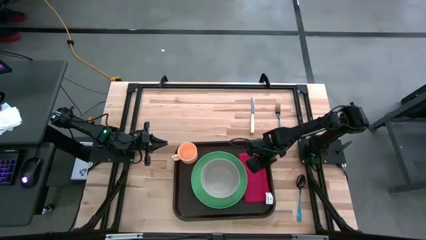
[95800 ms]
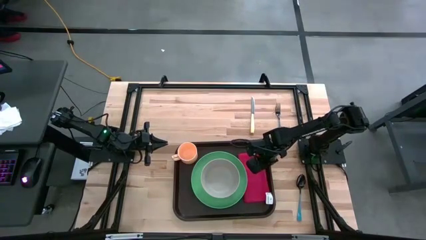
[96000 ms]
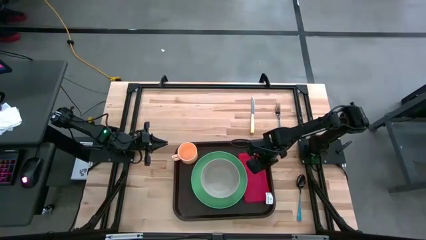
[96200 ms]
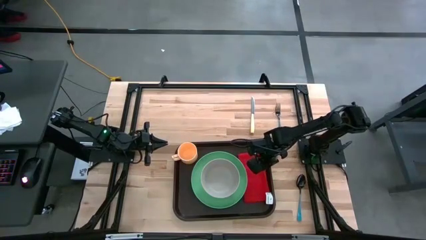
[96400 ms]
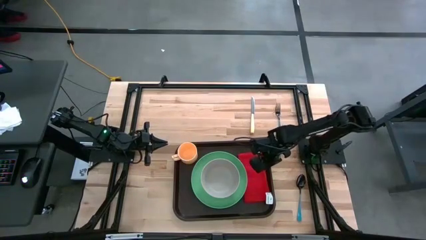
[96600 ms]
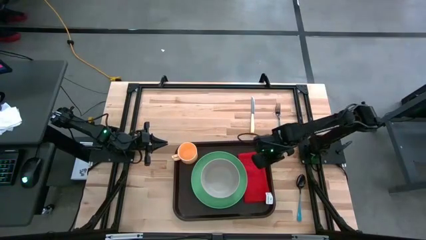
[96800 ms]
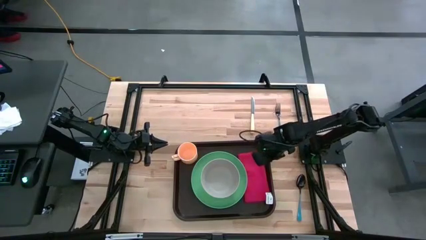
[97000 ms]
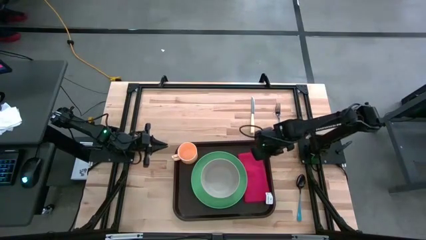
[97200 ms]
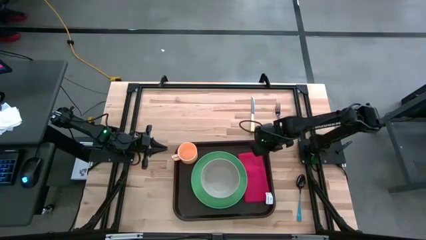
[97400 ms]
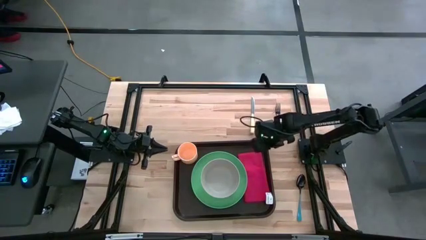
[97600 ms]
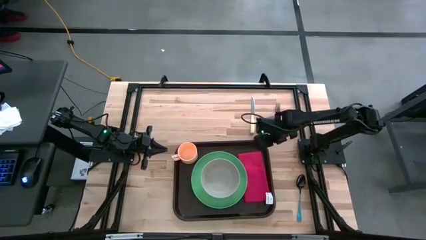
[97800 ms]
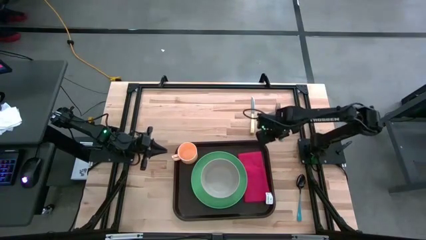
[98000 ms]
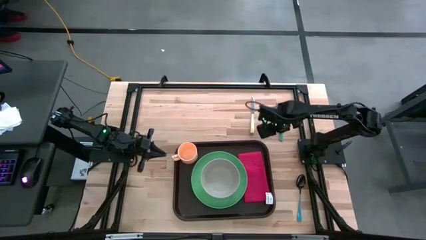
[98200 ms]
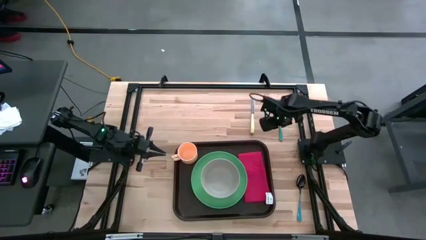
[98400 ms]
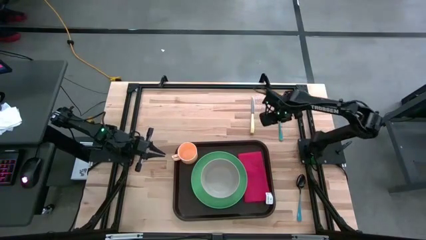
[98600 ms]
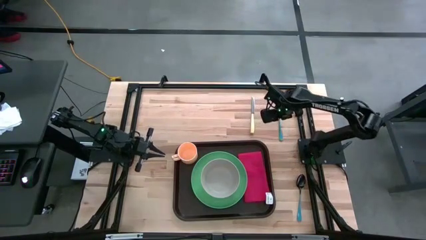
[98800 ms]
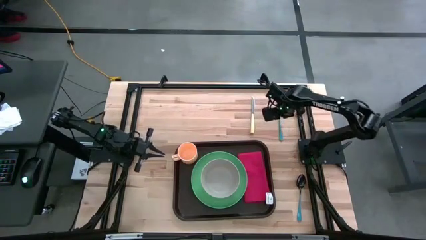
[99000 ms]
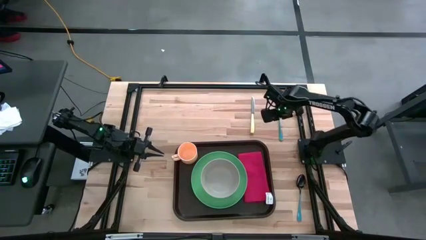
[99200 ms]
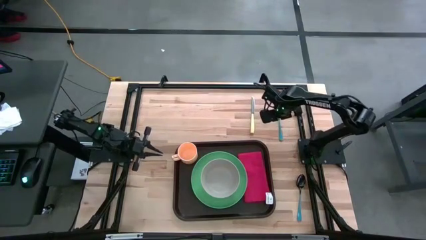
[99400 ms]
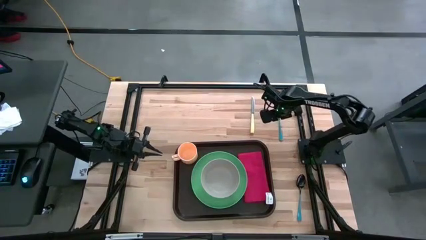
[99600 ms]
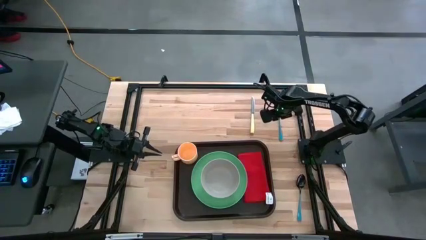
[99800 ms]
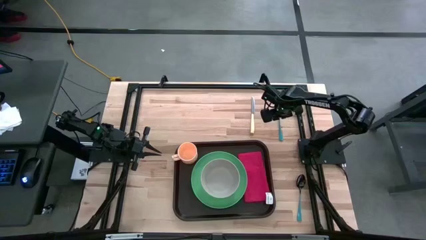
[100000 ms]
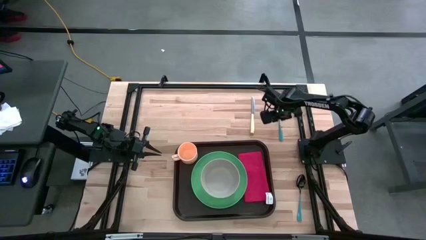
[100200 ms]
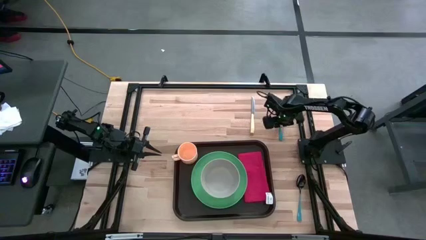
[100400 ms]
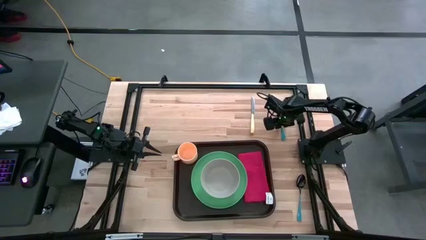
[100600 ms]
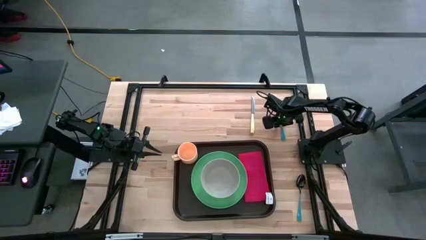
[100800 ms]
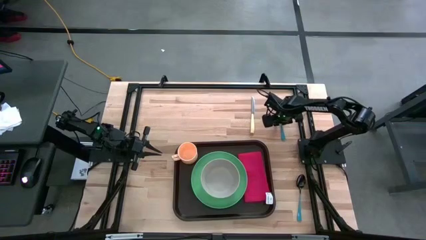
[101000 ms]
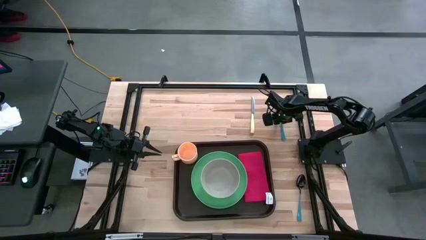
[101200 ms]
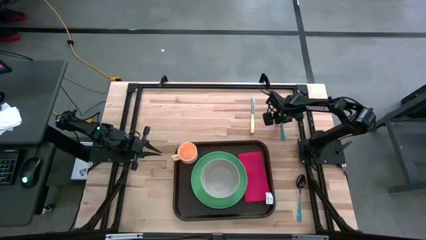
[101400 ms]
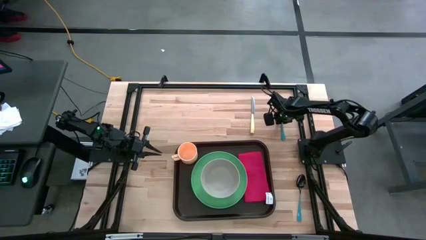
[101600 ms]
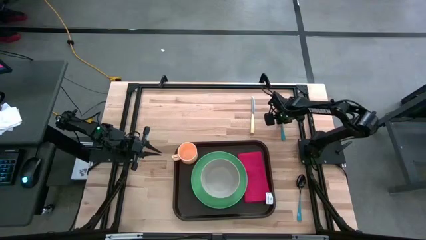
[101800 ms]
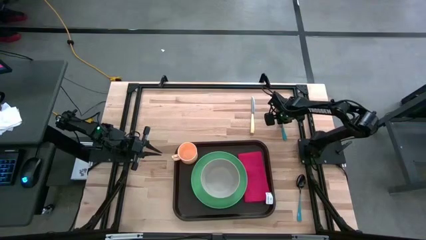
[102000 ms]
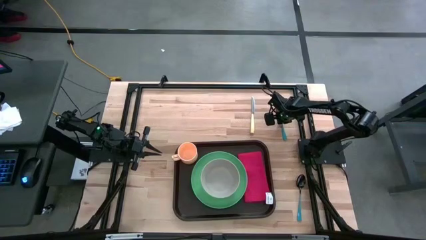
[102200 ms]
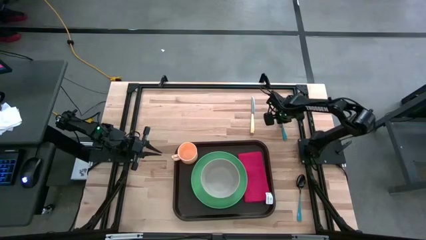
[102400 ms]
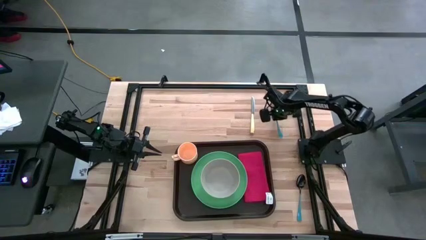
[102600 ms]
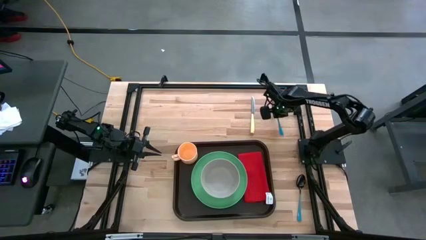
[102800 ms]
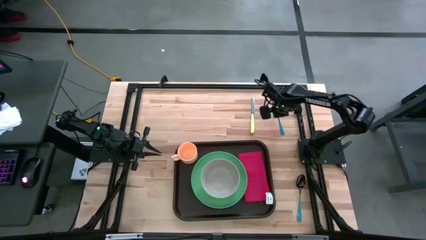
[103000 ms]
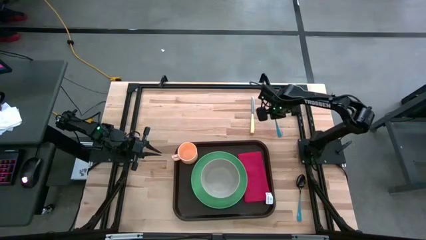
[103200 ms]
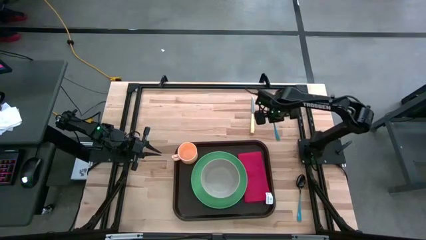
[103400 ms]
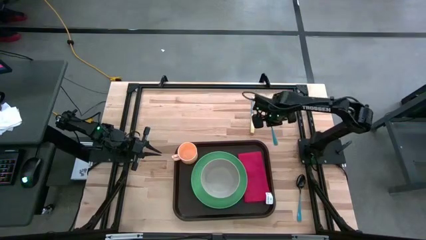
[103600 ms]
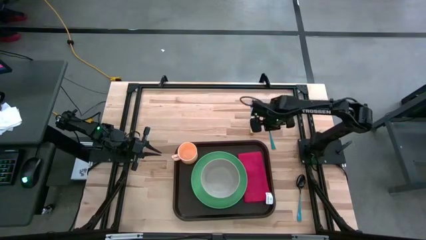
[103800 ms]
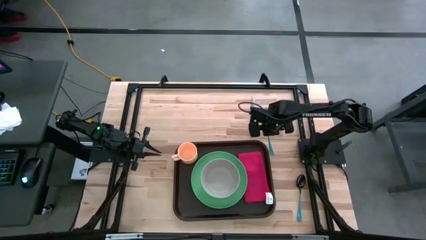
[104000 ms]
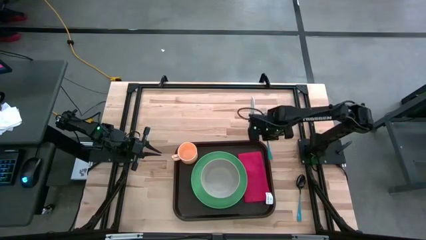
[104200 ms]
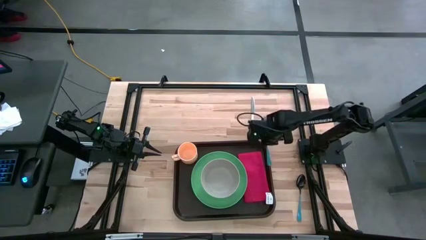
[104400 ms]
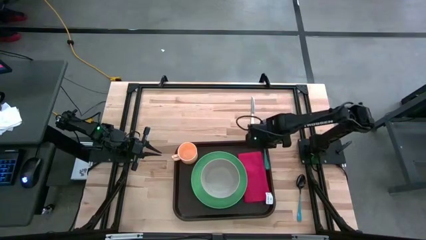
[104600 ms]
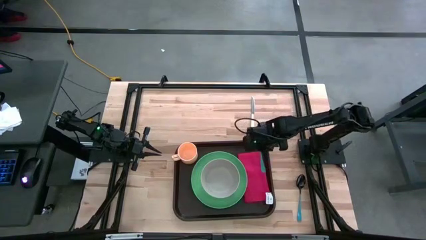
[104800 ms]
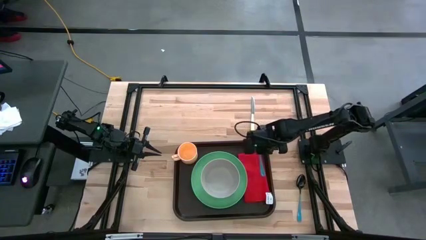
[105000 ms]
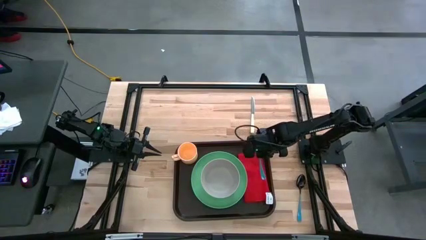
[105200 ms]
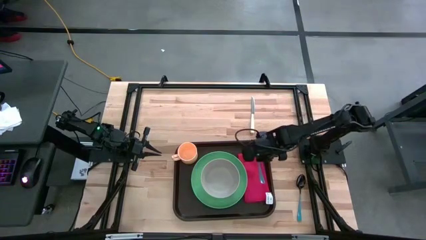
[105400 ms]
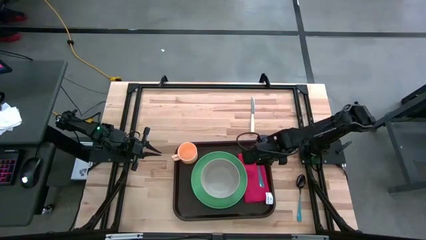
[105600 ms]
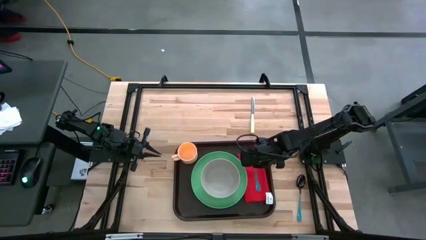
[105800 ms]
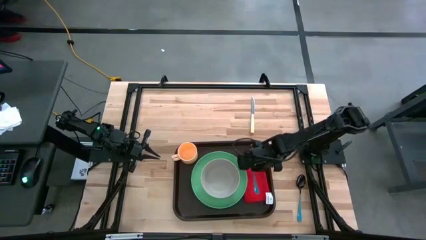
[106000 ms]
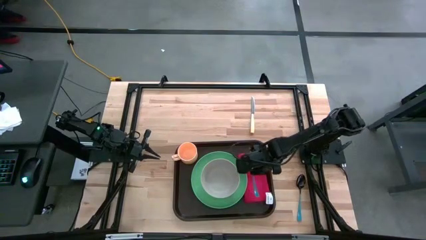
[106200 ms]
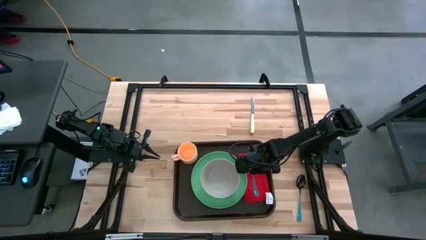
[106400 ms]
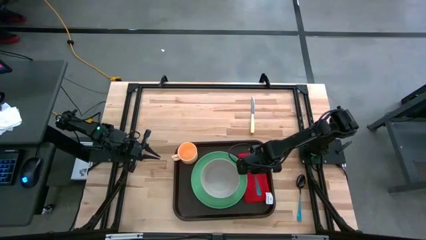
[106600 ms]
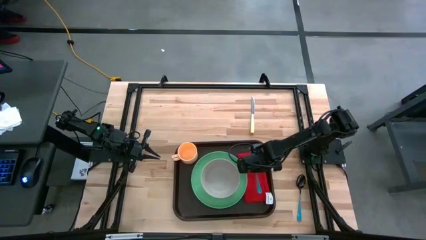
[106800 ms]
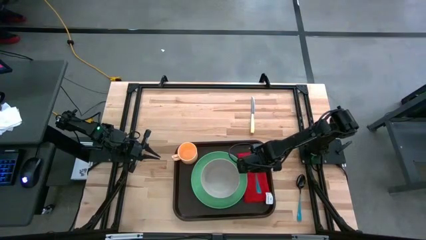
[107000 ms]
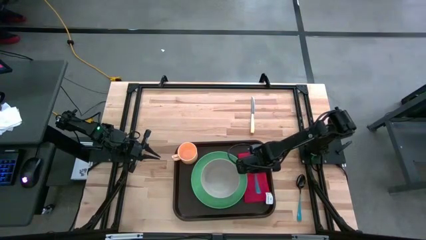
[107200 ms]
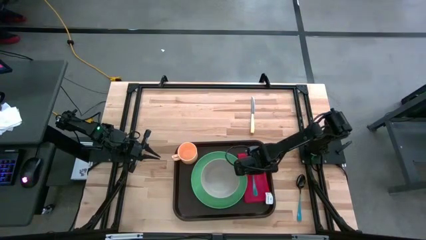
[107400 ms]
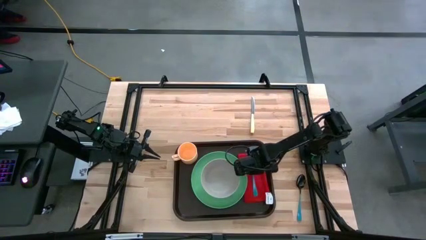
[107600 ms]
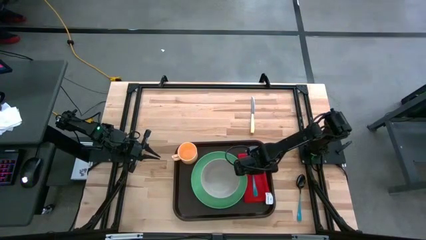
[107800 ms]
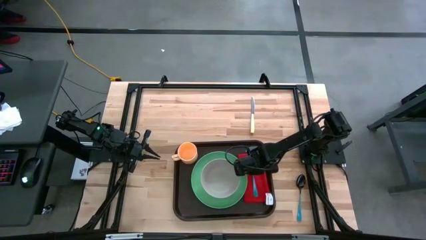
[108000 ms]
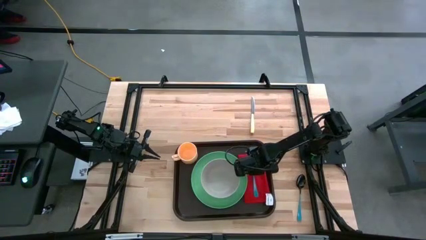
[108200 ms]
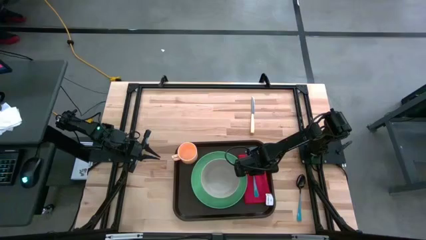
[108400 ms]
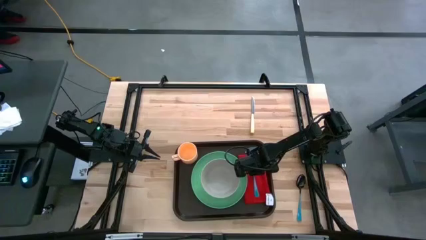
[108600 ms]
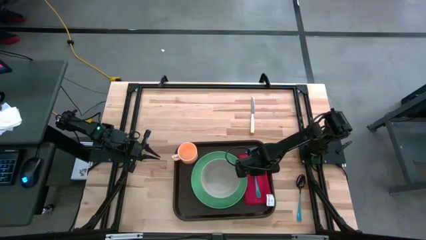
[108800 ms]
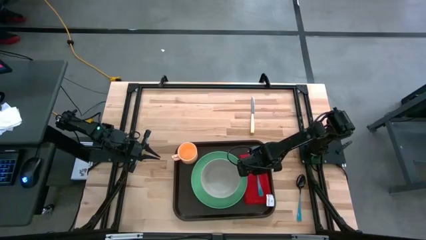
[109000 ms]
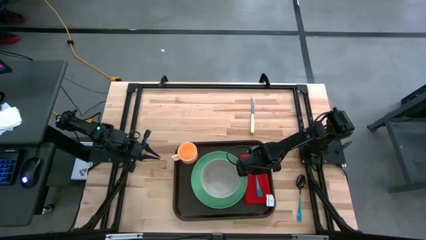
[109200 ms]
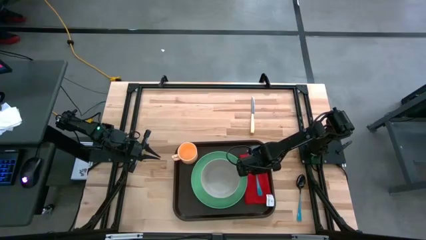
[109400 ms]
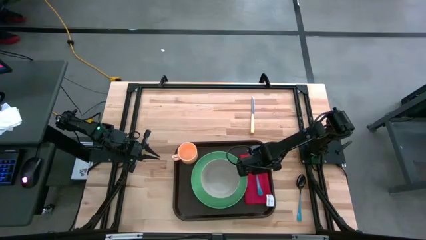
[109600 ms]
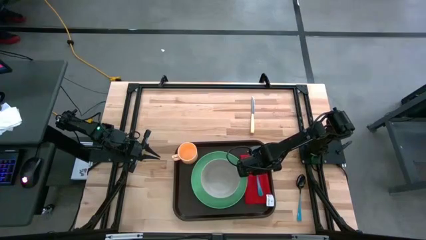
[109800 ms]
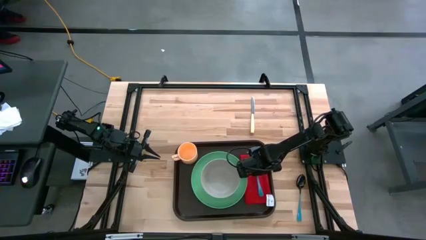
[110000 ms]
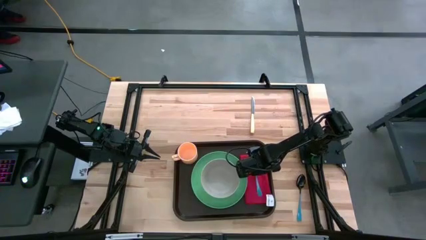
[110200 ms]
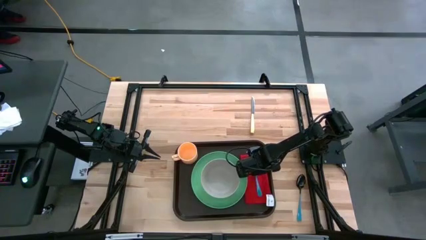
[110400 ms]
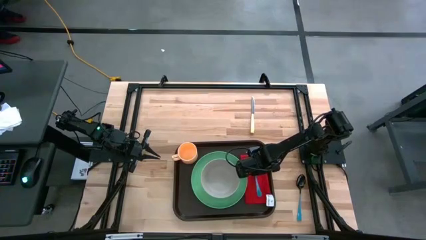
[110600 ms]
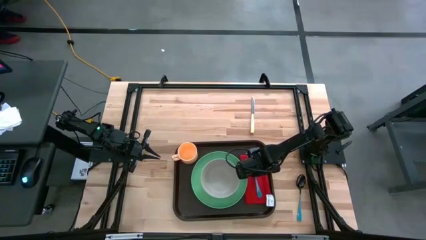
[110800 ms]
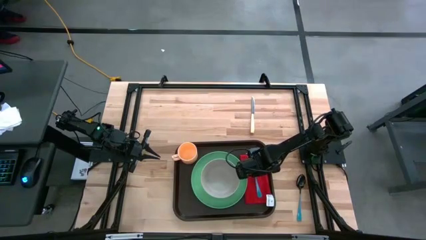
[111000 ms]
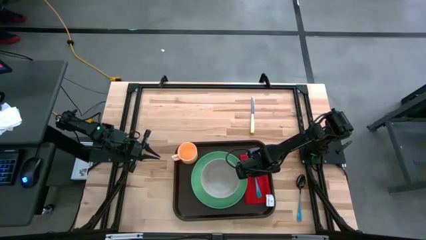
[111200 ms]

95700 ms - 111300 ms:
Task: Set up tray
Put the blue fork on the red napkin on the brown serving tray
